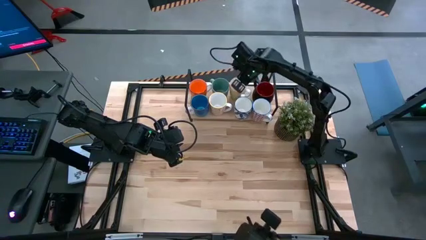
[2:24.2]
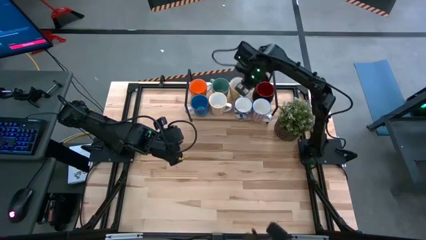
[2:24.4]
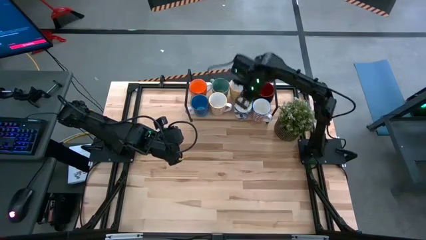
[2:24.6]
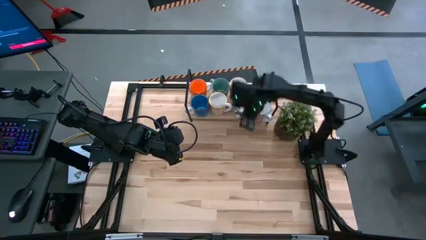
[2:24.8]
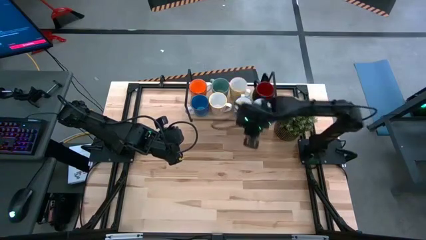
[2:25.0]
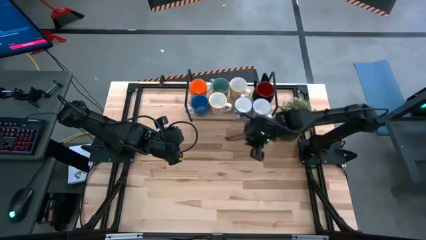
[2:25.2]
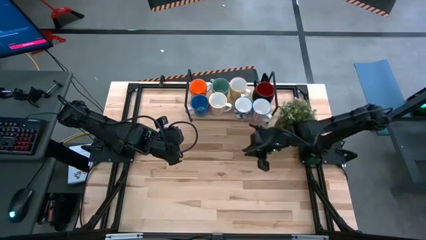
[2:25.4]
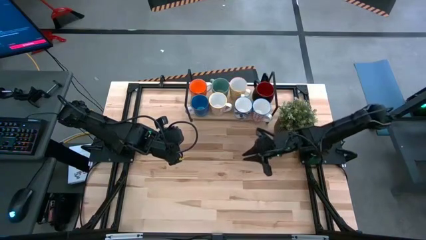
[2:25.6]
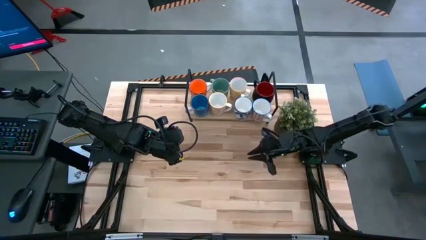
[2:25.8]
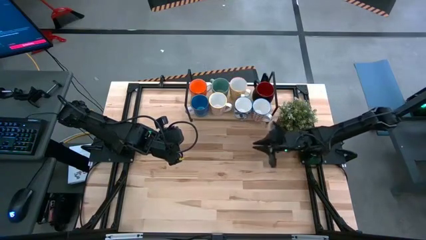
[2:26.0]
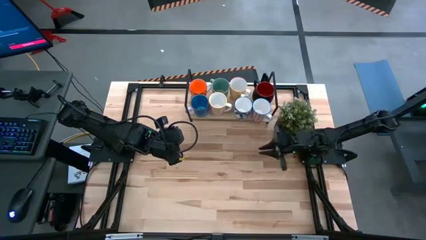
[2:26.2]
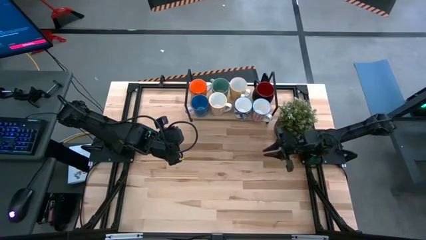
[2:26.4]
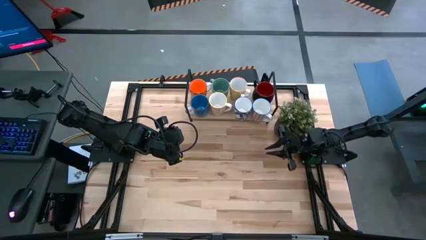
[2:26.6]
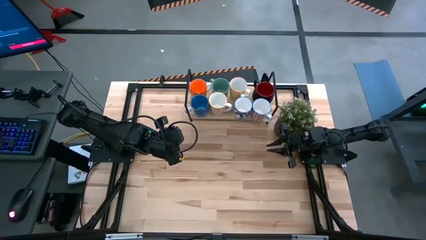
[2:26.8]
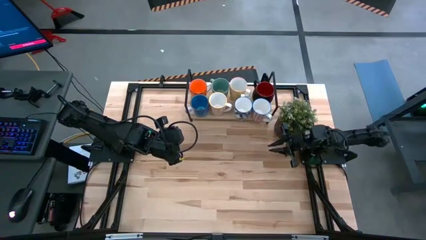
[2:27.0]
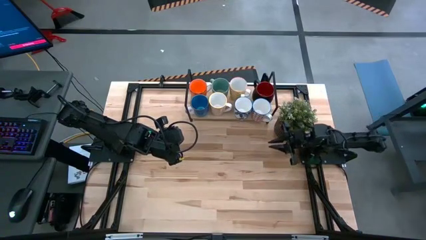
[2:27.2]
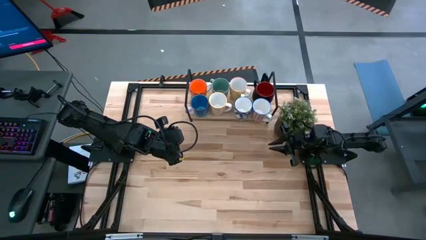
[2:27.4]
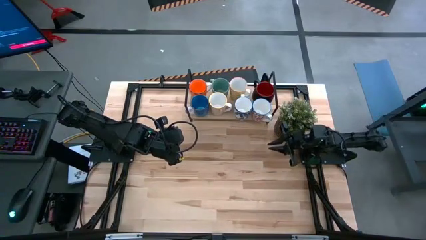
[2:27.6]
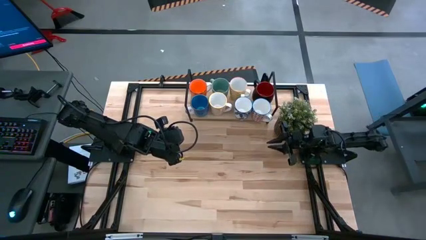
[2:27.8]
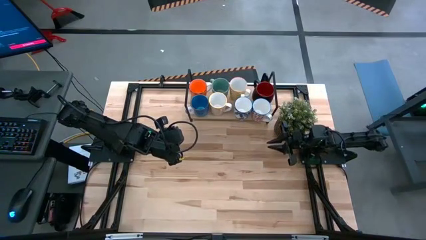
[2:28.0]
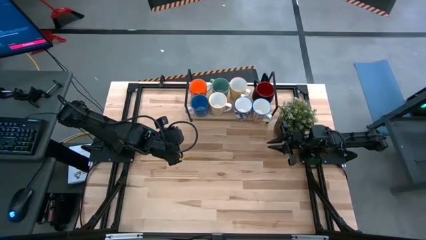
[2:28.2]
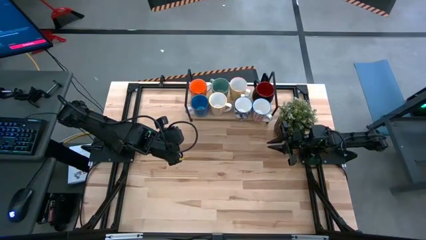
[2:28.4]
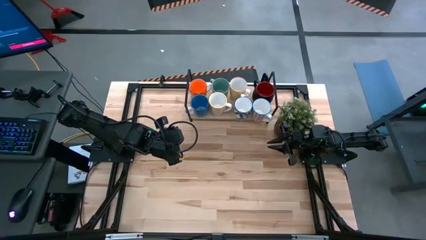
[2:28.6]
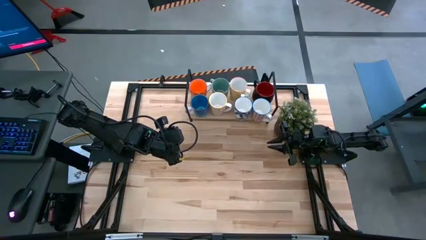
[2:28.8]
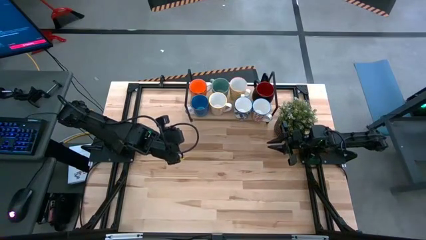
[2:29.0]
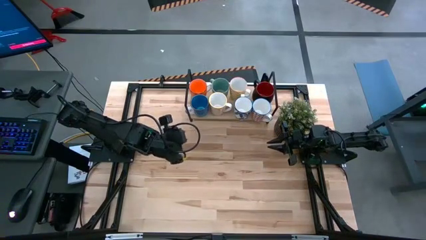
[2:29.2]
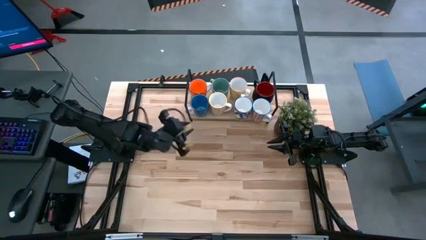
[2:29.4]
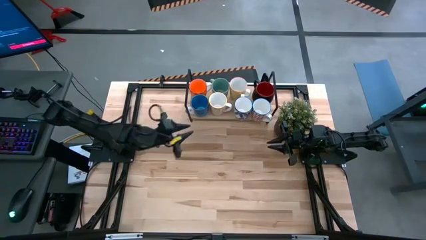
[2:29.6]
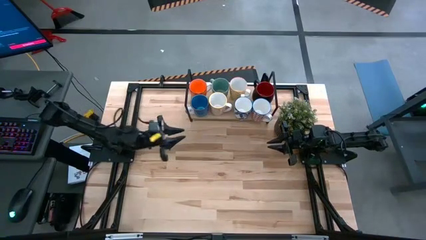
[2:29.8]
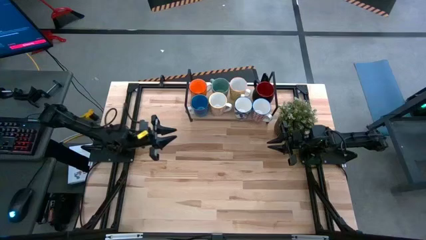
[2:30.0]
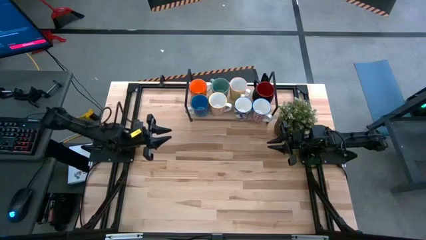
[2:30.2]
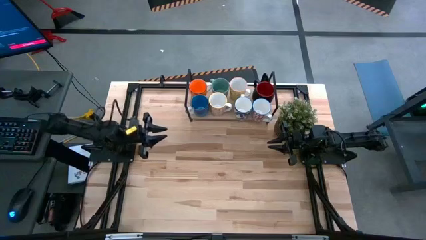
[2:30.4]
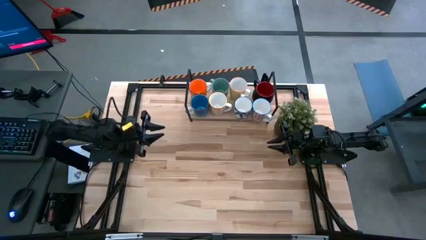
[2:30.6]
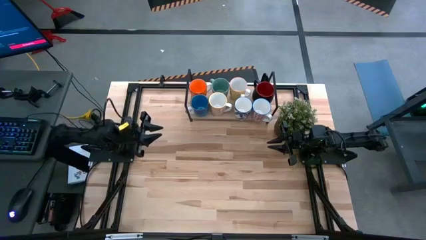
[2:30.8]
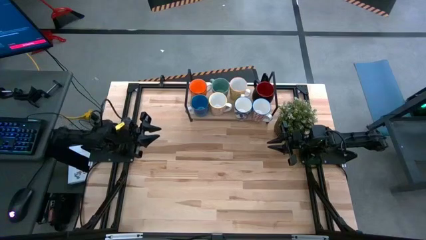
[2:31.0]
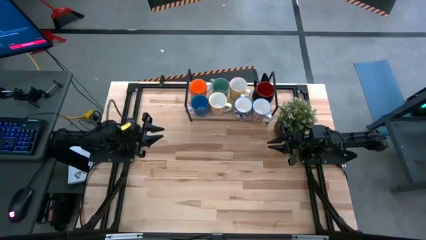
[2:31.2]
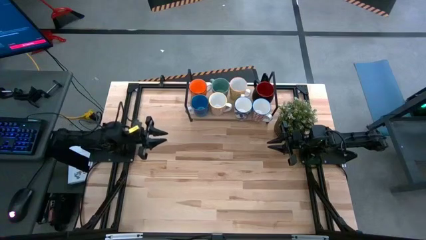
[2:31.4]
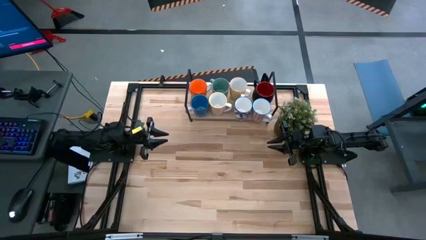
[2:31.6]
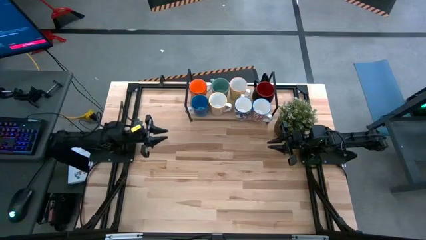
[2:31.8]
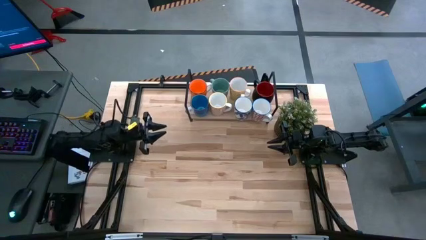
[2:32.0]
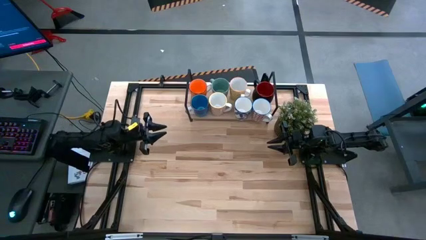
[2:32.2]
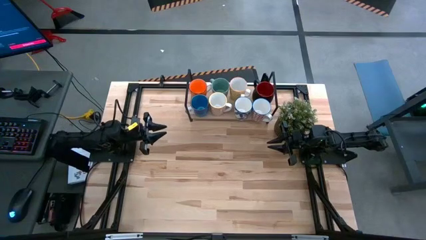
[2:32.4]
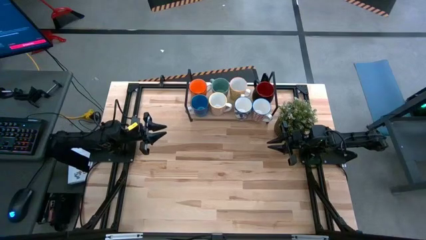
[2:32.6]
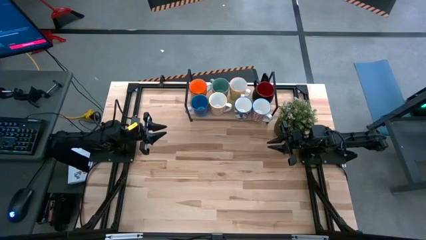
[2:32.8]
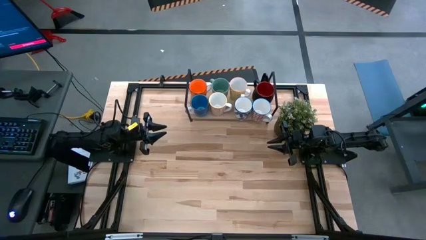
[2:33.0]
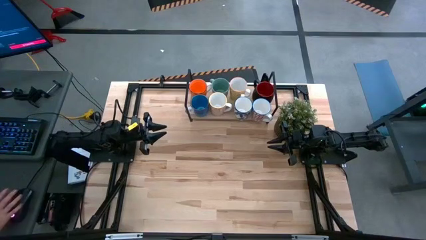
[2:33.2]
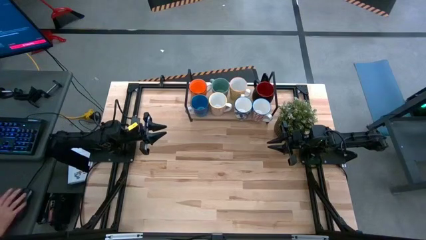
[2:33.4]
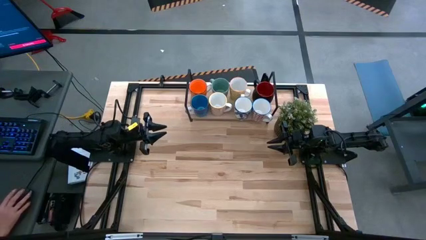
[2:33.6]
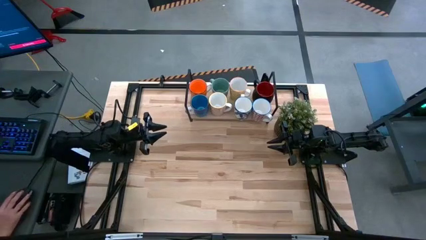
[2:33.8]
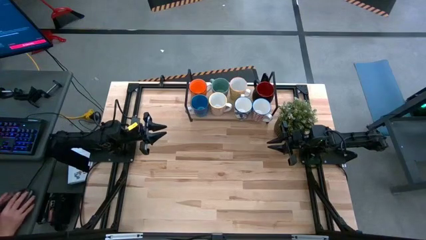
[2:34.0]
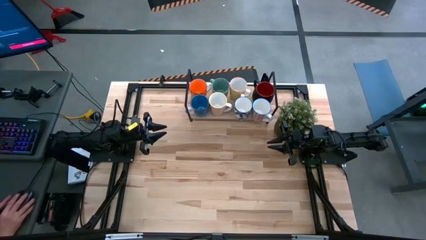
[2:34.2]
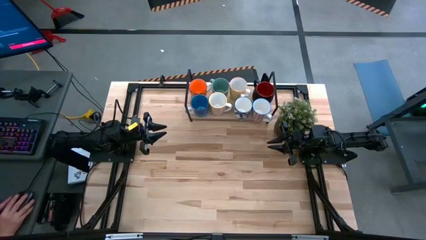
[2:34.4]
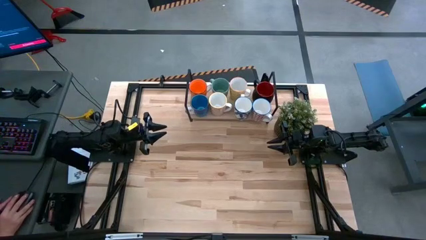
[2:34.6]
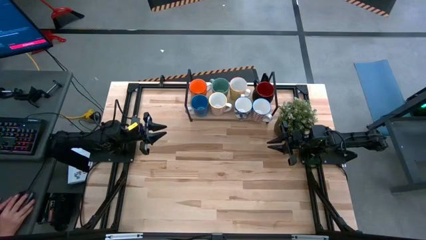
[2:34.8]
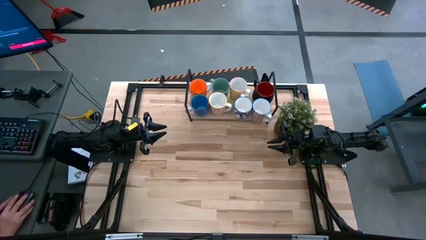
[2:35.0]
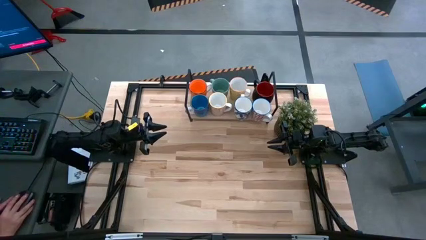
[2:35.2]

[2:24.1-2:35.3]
Task: Place coffee mugs
Return to Home Position

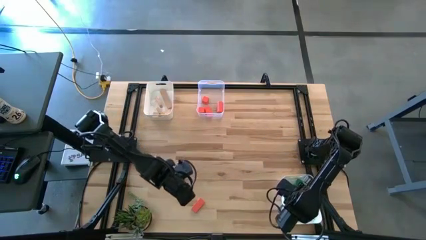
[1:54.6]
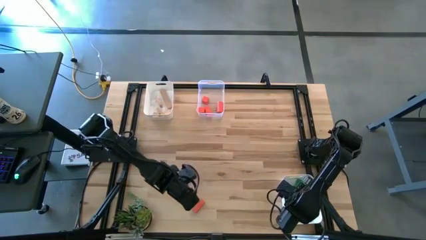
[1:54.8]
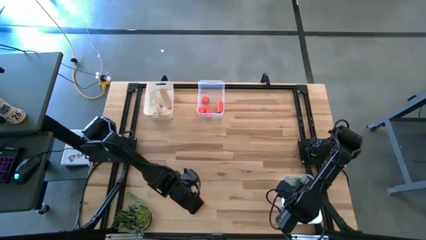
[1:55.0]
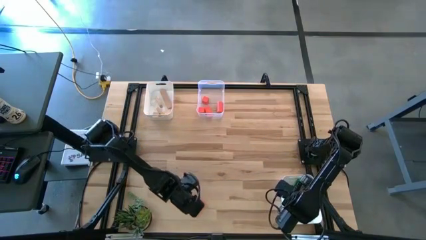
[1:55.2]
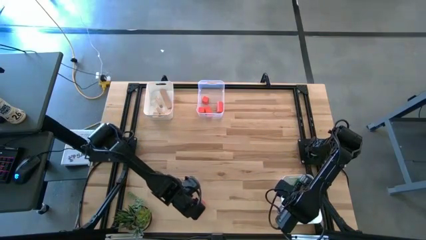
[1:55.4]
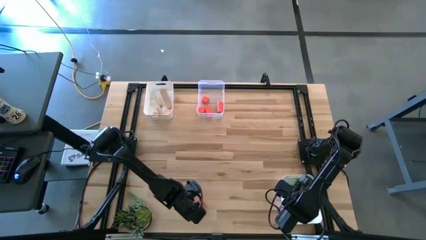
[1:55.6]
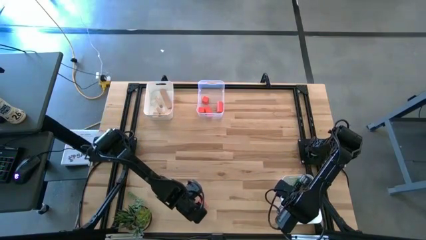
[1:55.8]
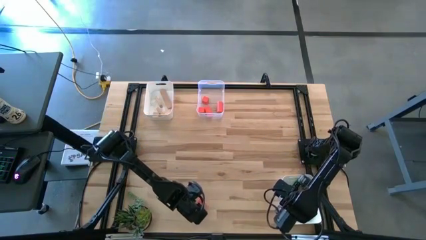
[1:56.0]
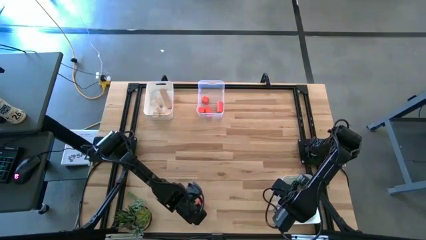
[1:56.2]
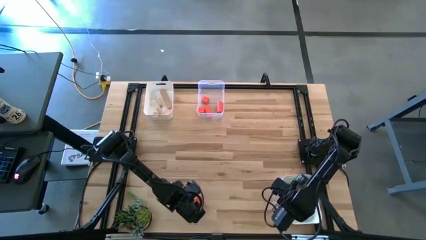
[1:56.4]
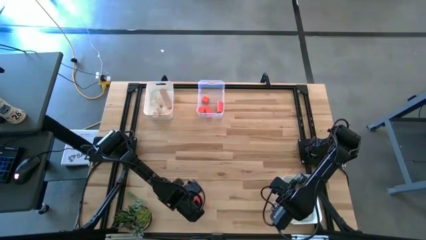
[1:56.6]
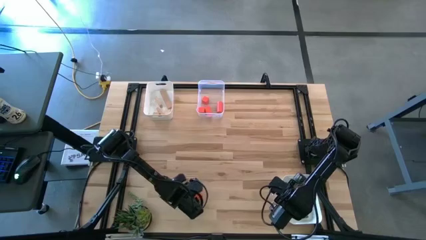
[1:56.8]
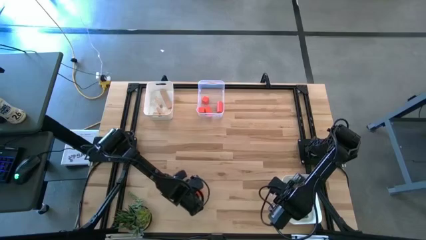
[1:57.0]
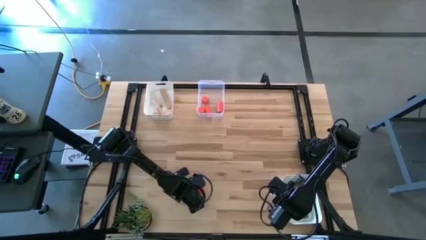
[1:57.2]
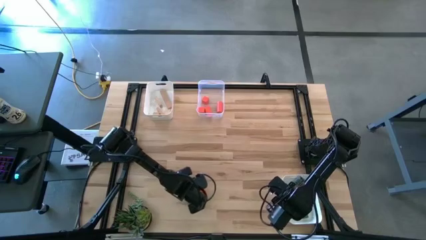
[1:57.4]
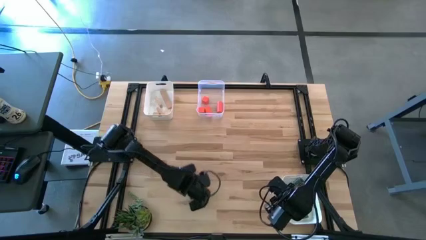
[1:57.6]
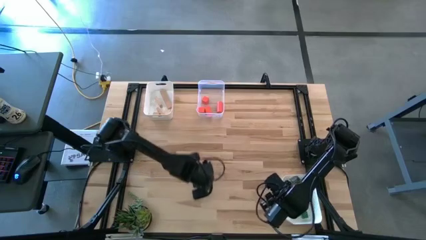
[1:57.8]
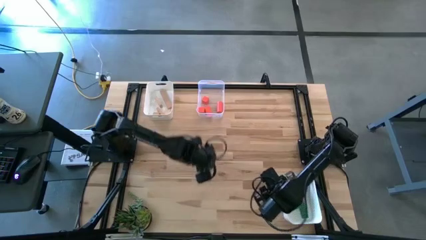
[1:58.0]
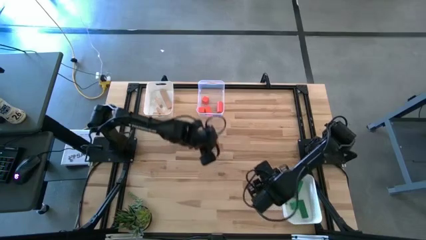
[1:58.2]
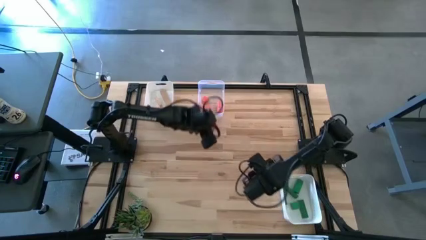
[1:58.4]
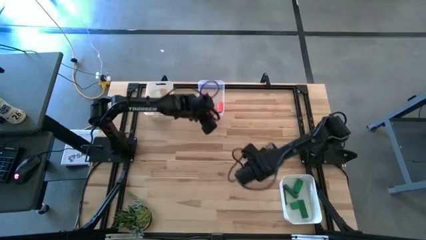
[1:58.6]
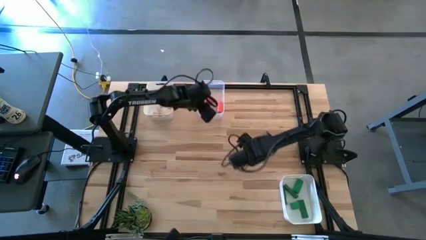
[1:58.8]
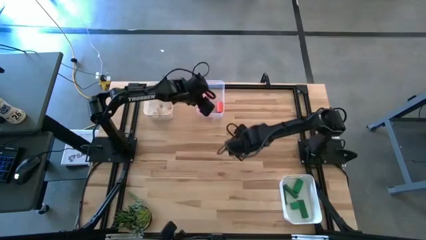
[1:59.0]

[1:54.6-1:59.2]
Task: Sort & place blocks by color
Put the orange block into the transparent bin
